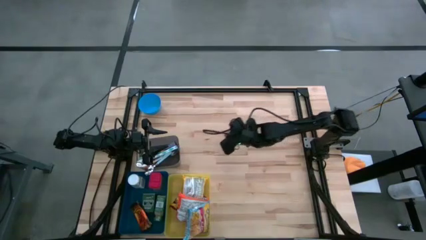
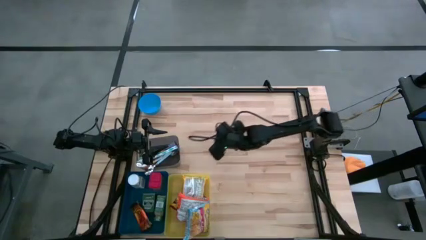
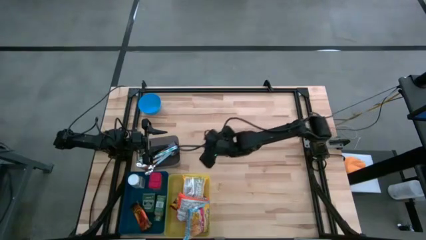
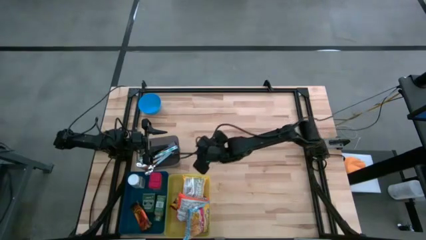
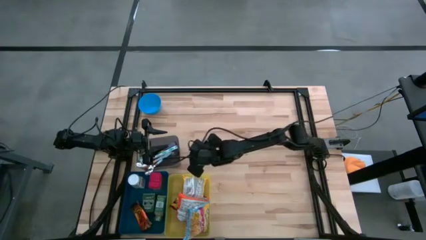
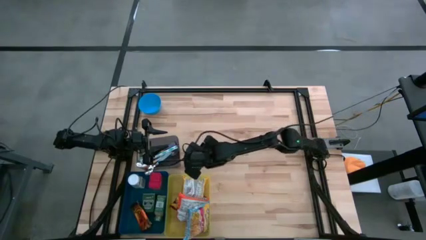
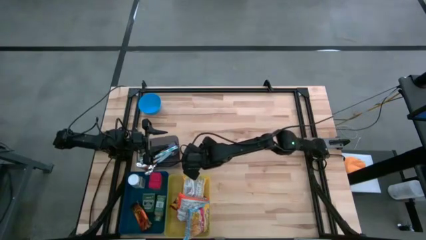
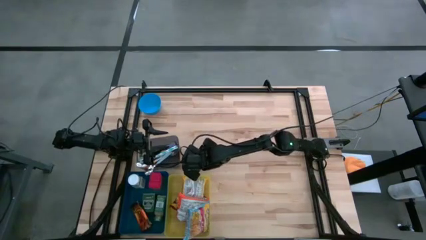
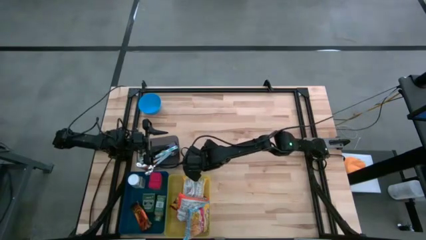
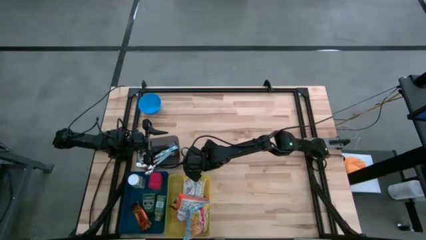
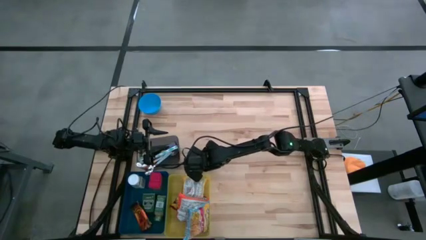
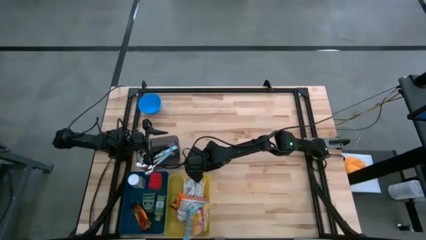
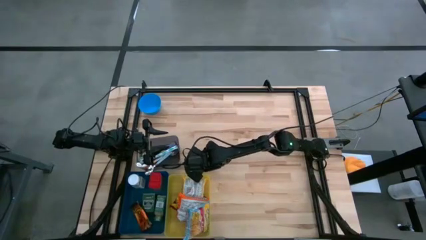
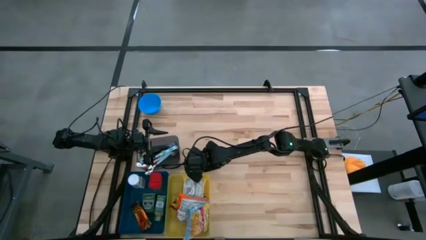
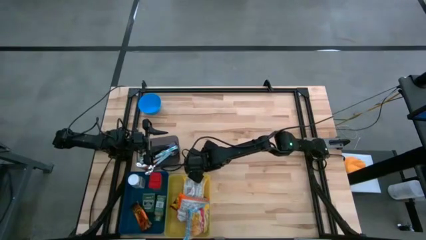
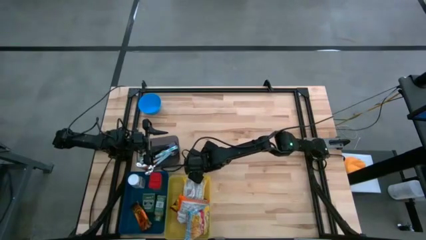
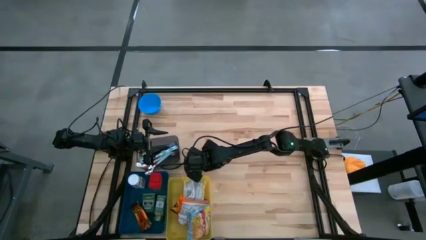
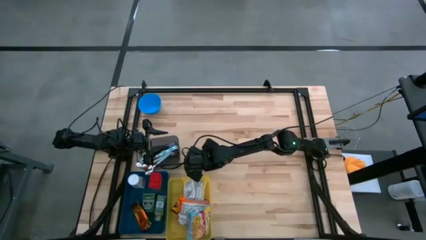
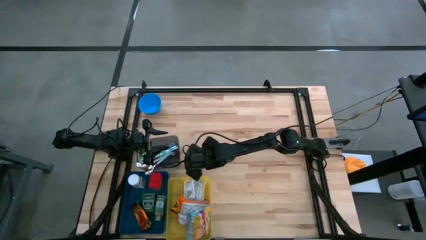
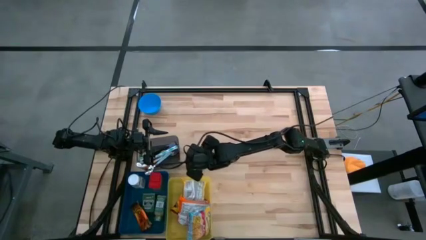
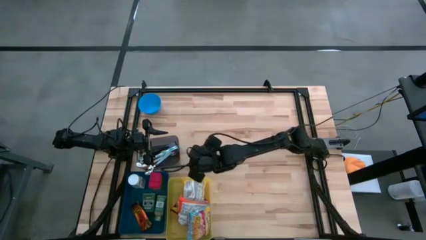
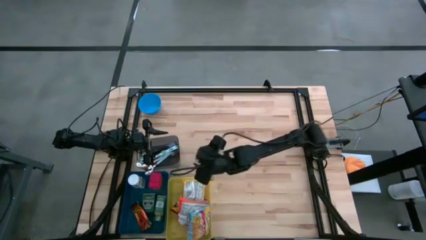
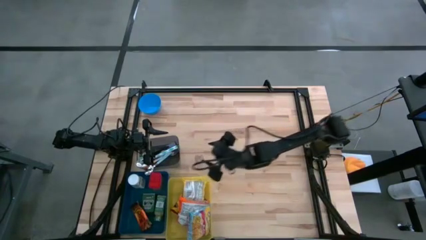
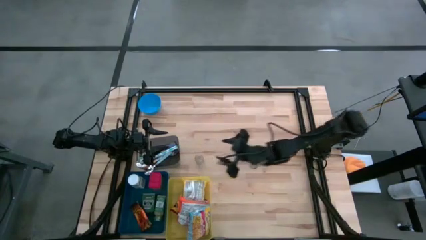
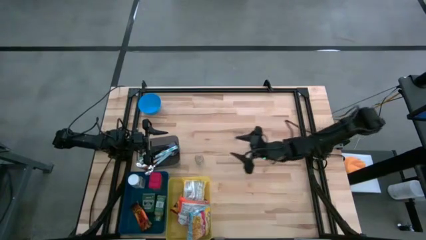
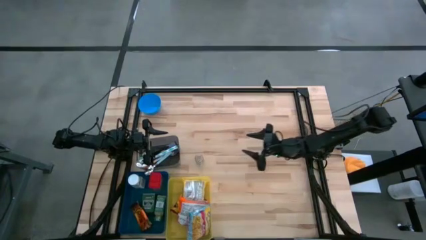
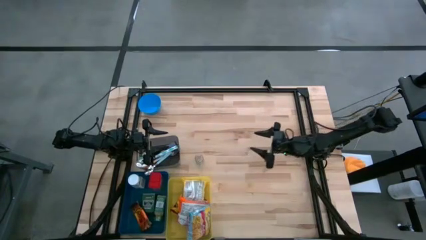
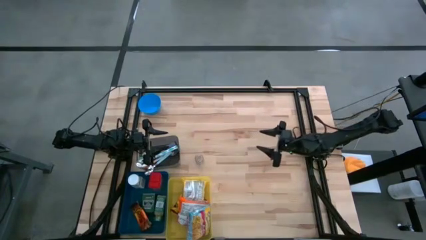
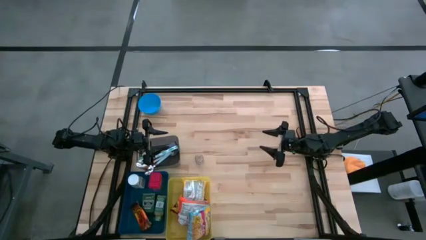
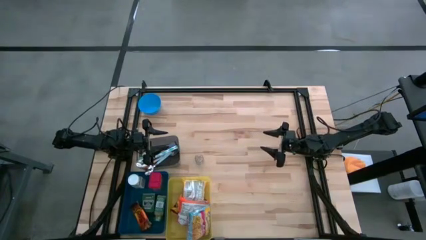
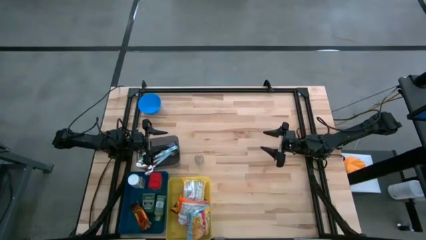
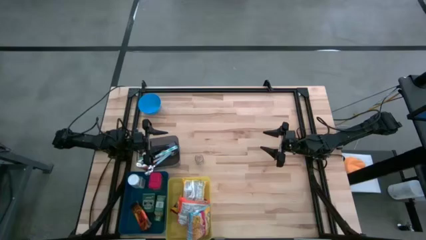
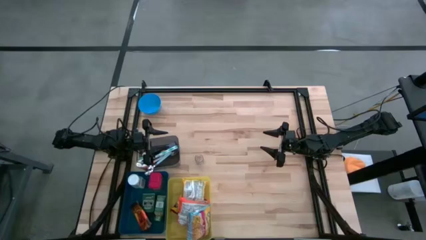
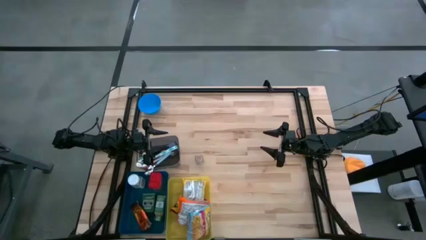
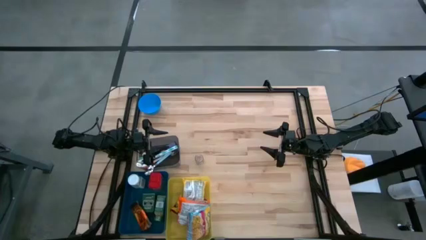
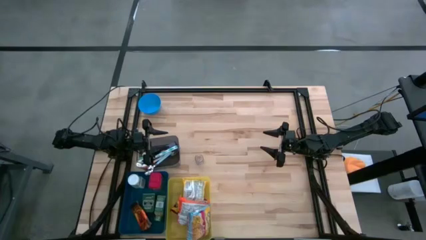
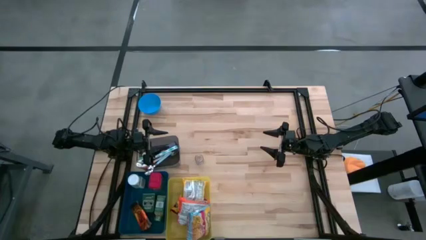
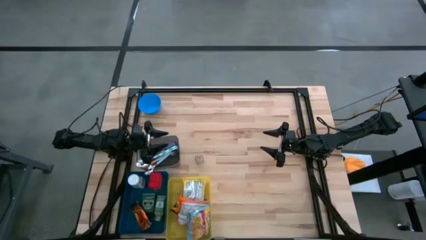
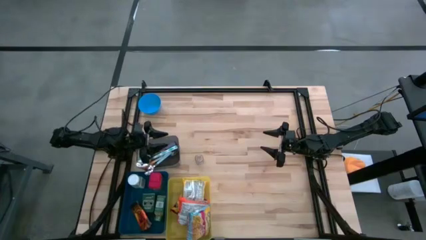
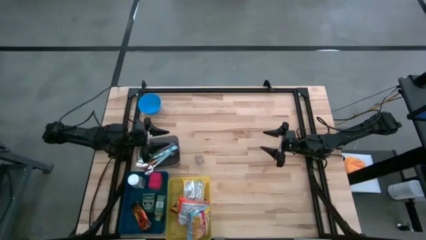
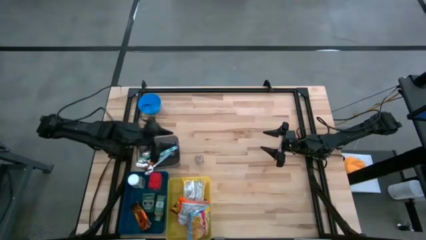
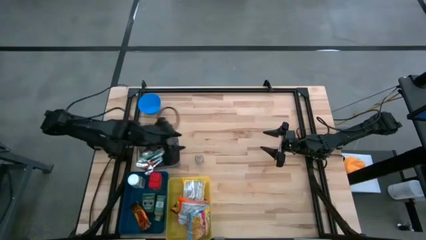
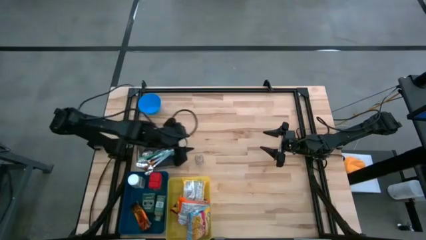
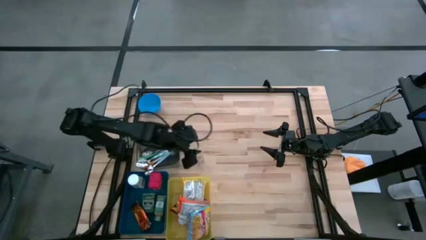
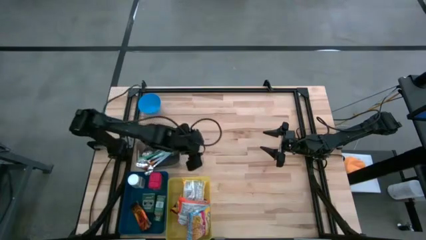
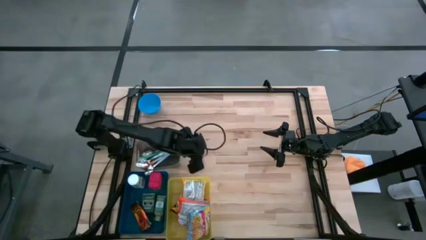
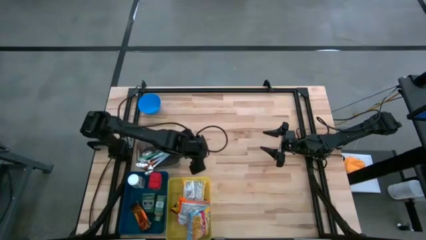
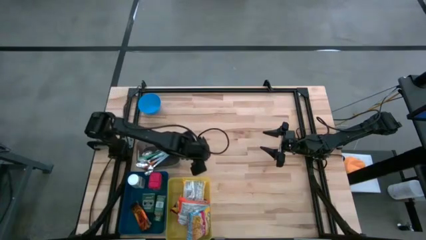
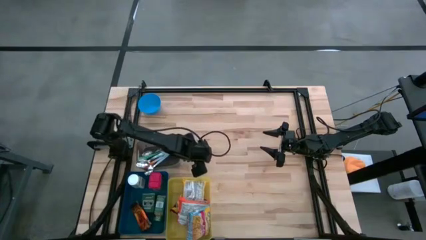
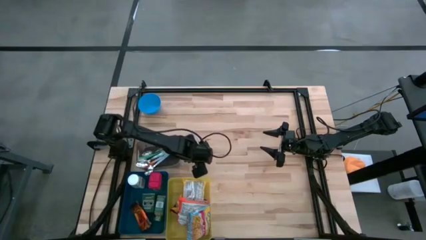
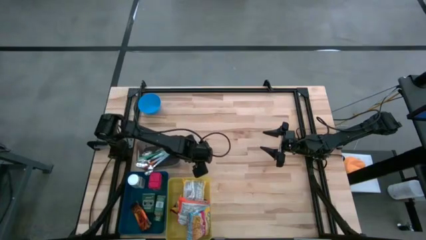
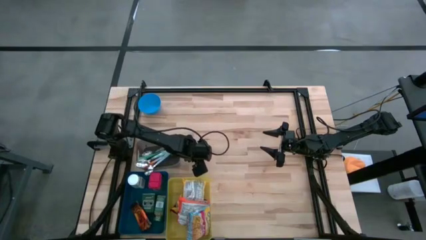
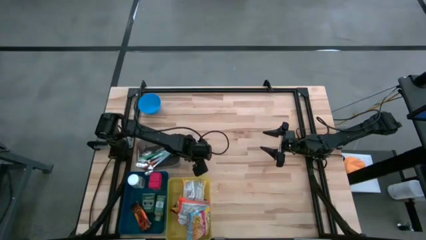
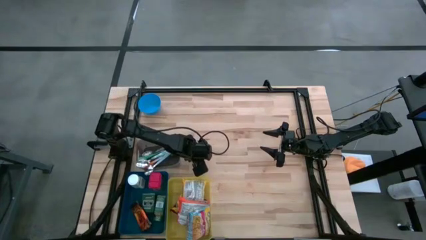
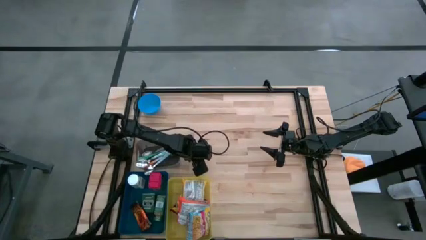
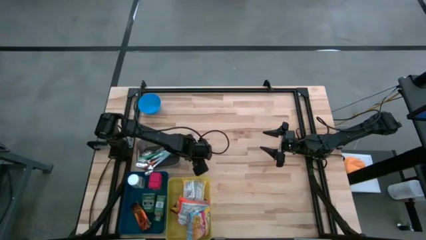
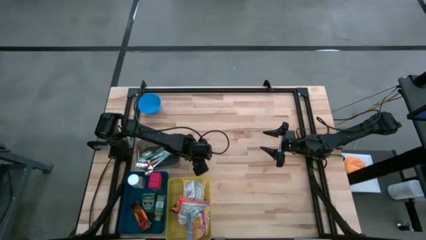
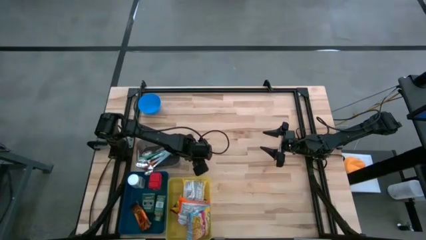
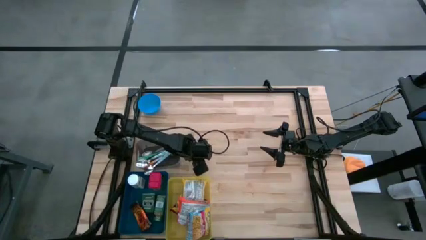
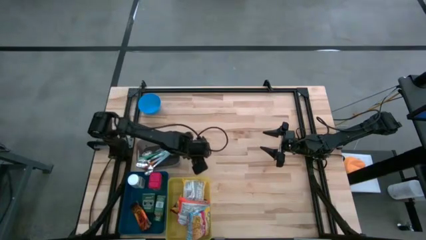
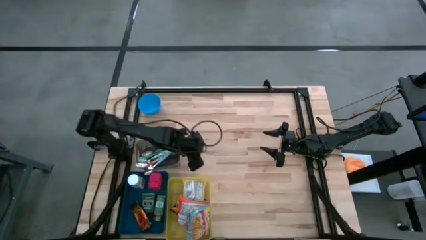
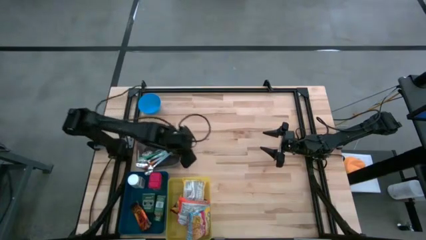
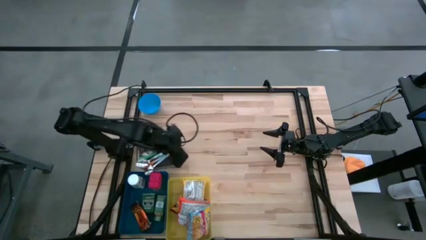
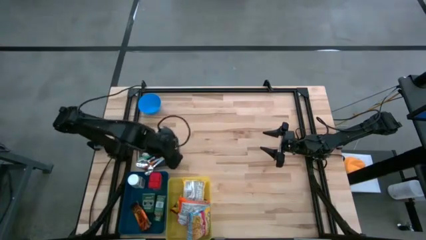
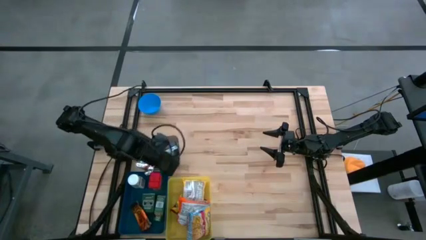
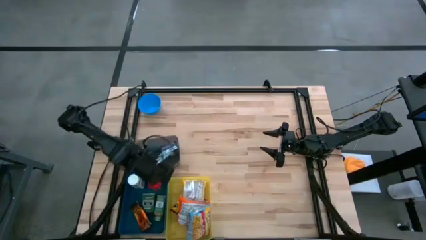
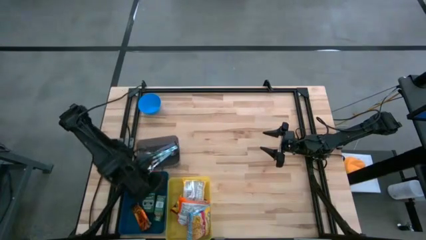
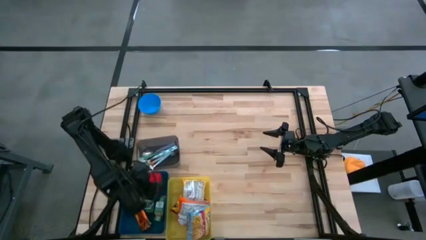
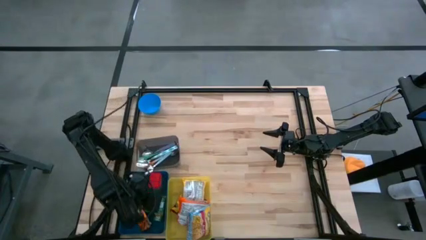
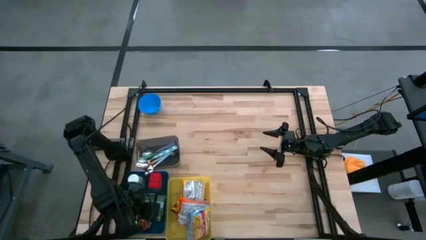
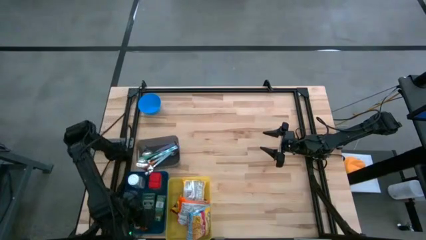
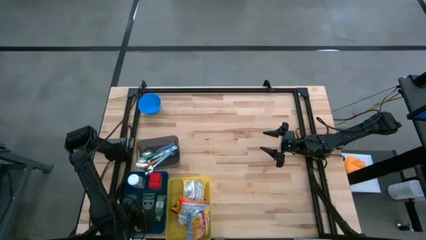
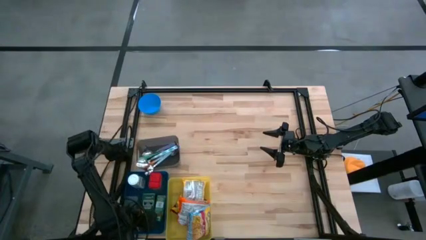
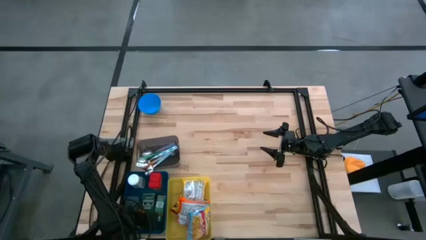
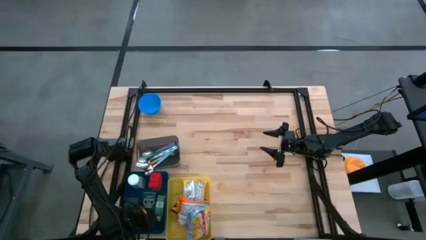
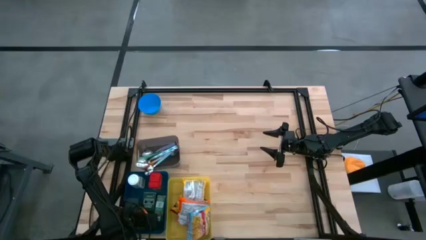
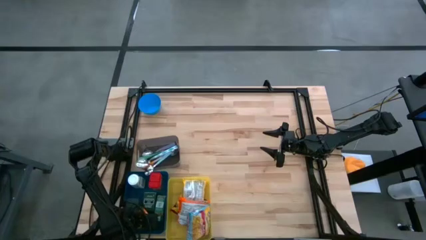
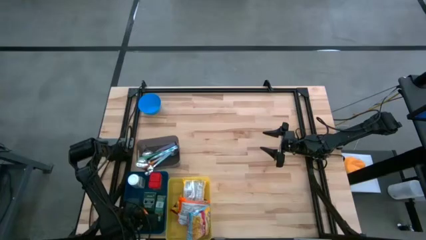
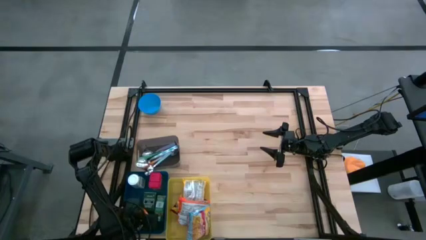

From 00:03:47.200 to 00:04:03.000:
Put the brown seasoning bottle into the blue bin
